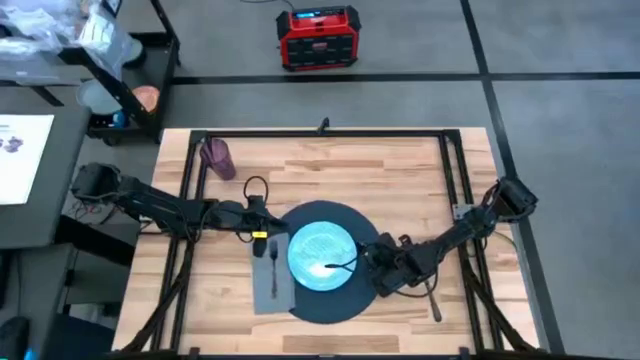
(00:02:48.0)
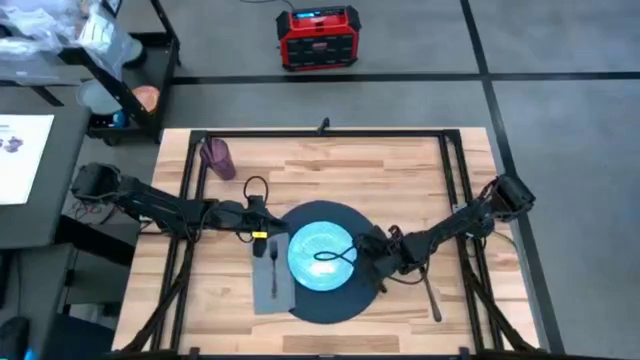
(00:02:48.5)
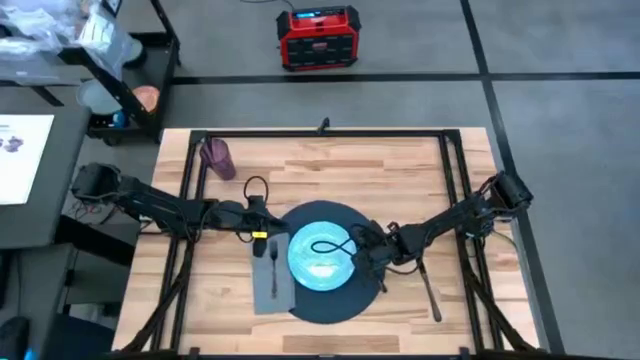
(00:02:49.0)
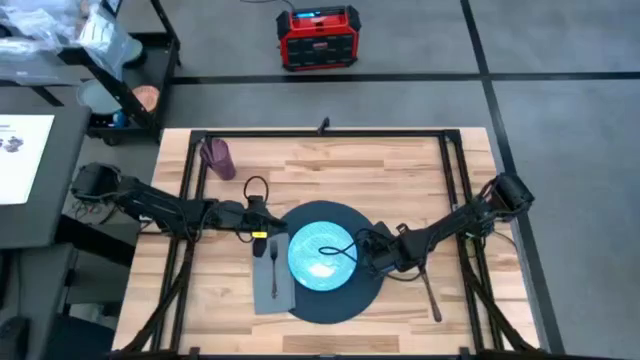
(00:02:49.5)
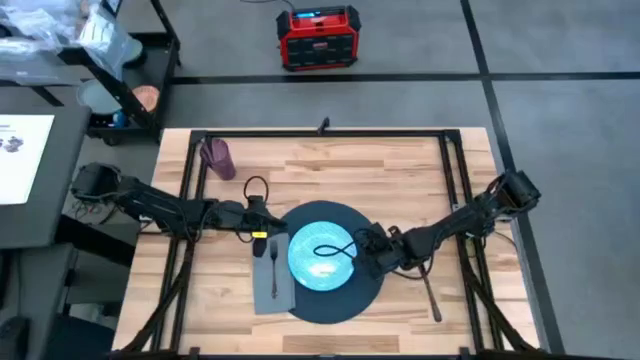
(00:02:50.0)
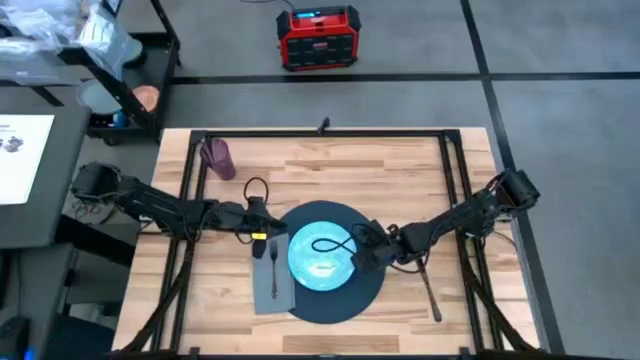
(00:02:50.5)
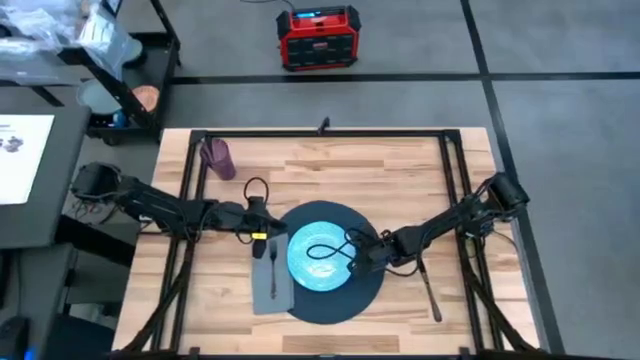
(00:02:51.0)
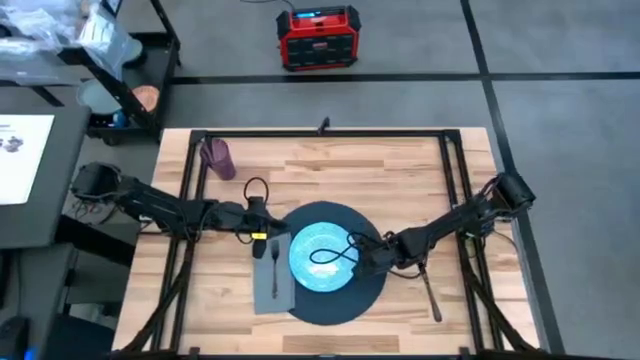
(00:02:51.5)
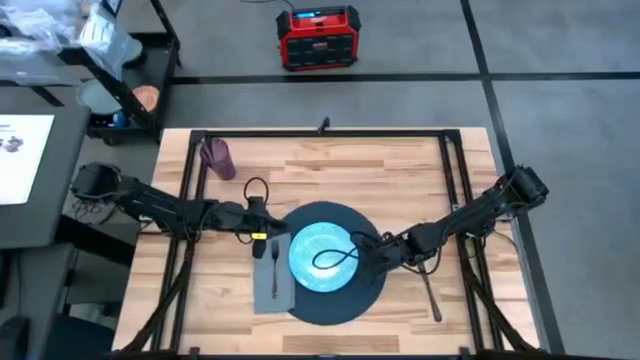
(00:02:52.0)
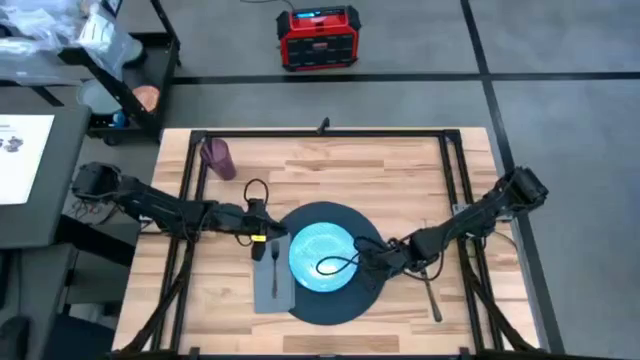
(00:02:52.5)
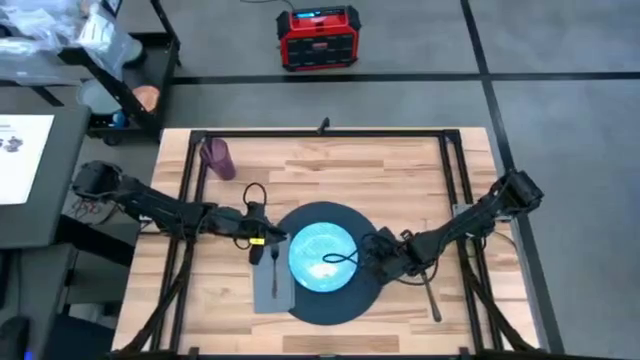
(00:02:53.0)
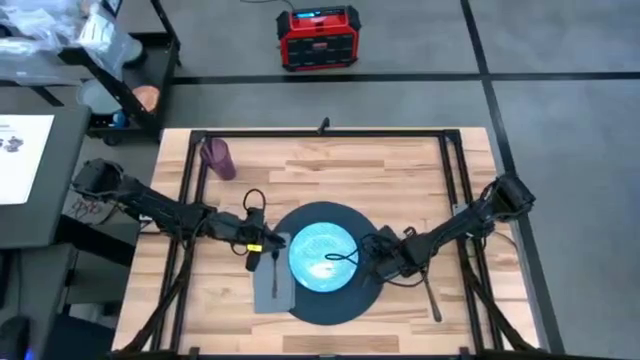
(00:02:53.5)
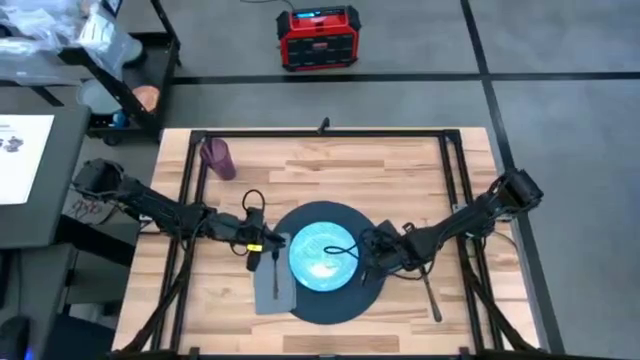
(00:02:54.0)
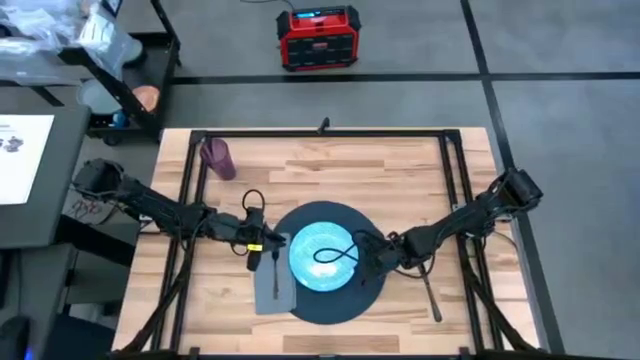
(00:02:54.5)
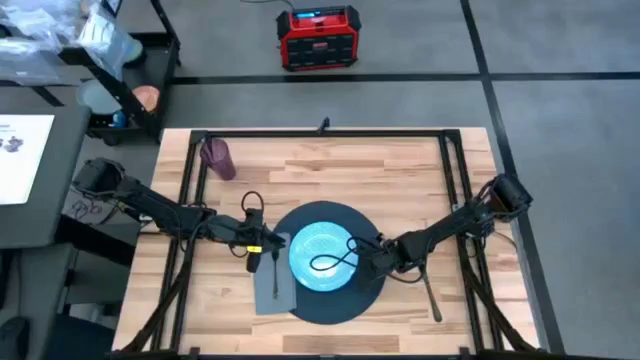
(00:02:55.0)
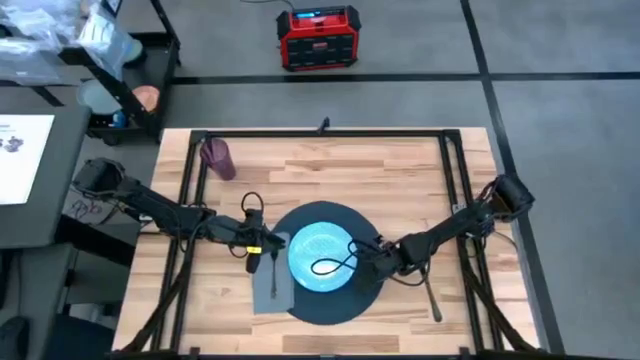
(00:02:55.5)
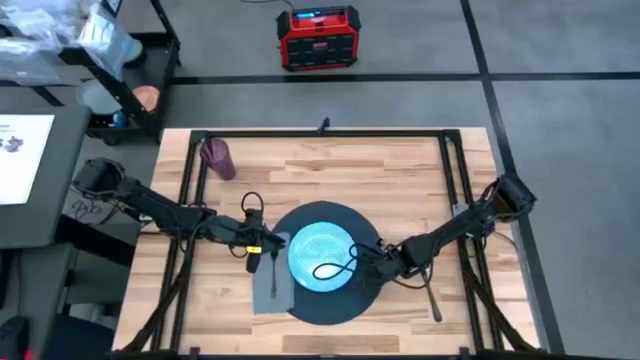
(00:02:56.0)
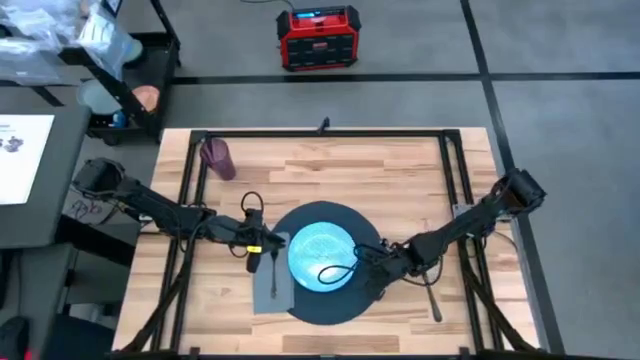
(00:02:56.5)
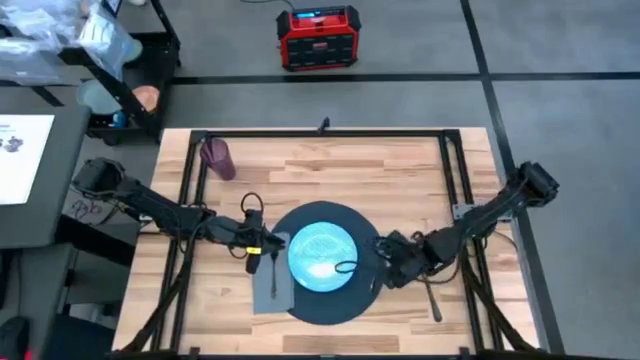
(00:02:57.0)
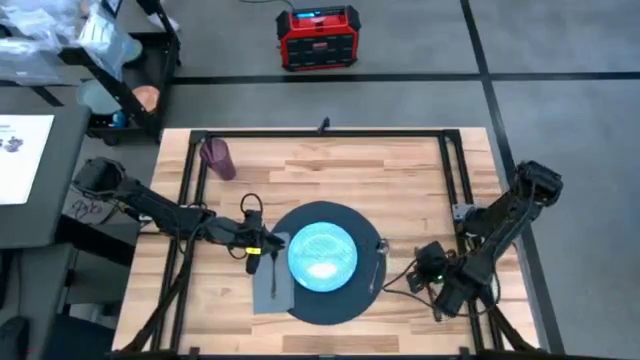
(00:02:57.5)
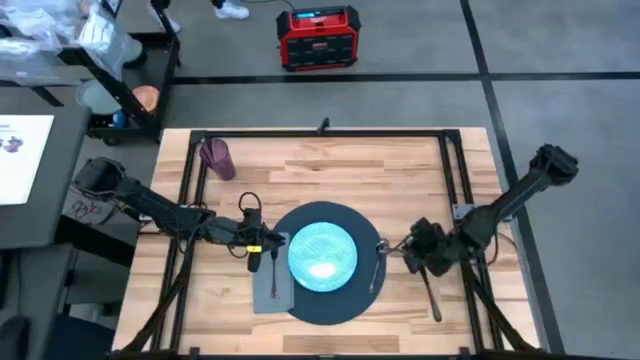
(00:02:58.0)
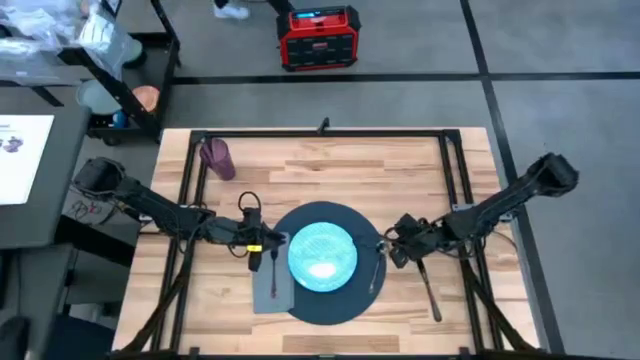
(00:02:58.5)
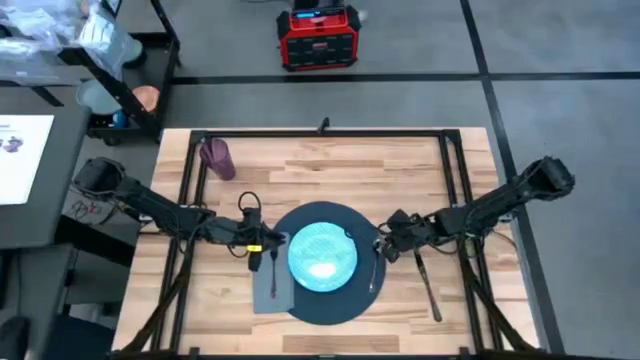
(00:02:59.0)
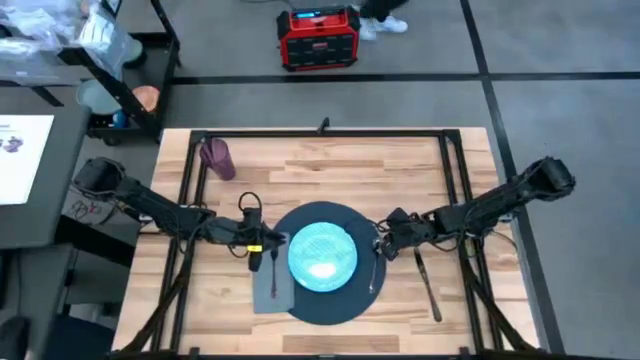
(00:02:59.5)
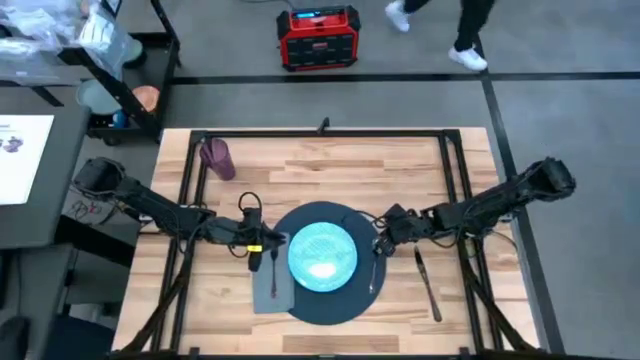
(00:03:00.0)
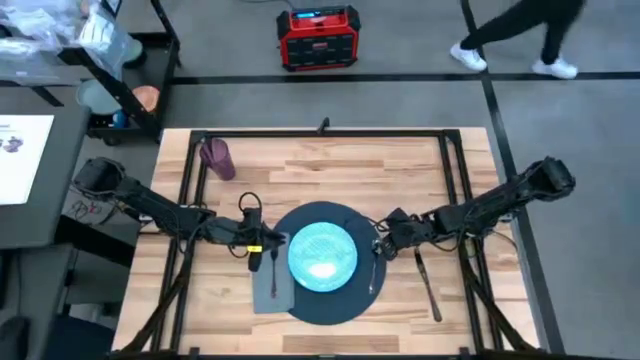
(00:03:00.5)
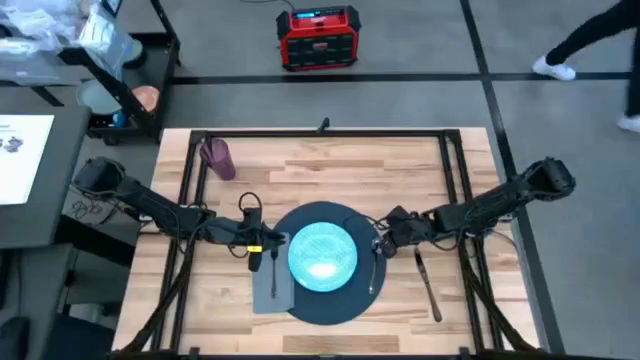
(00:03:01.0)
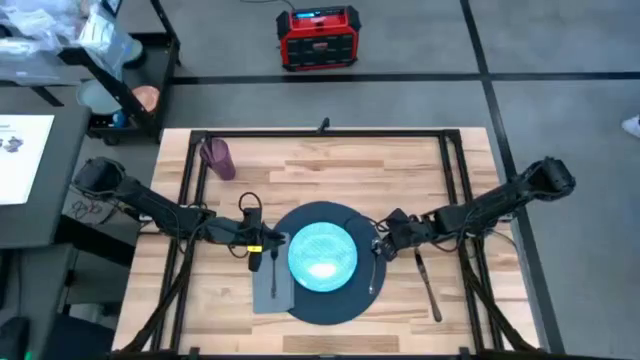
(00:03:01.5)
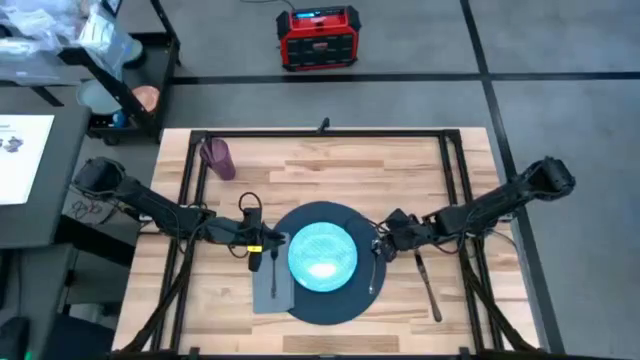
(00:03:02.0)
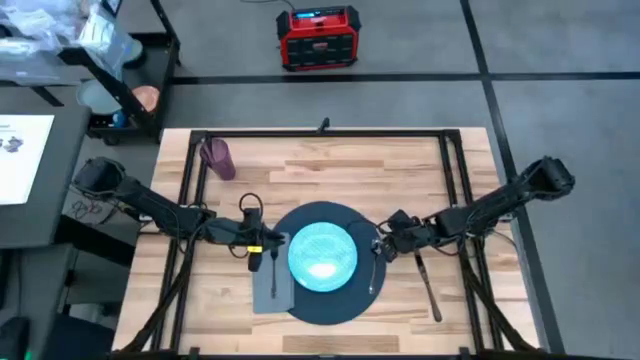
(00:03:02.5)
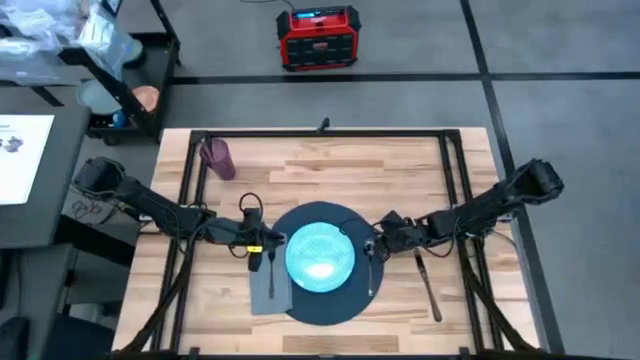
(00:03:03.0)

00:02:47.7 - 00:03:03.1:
Task: Set table place
Adjust the black spoon on the dark blue table mat

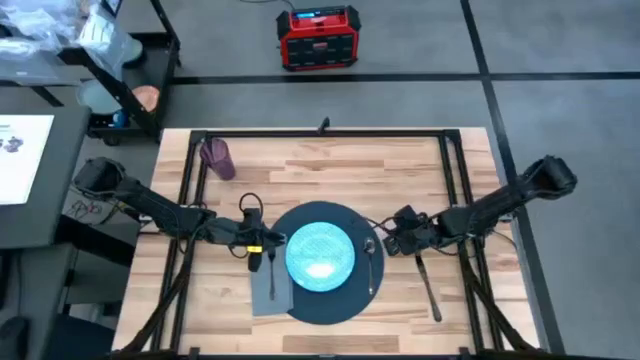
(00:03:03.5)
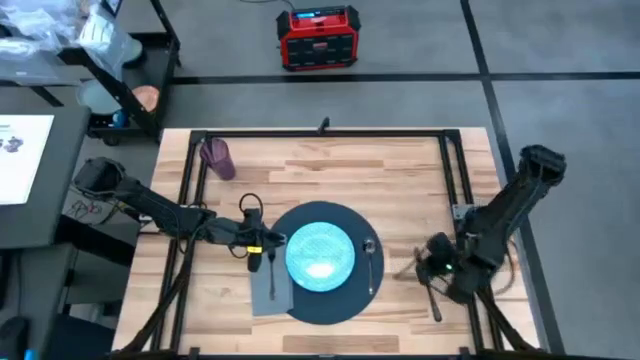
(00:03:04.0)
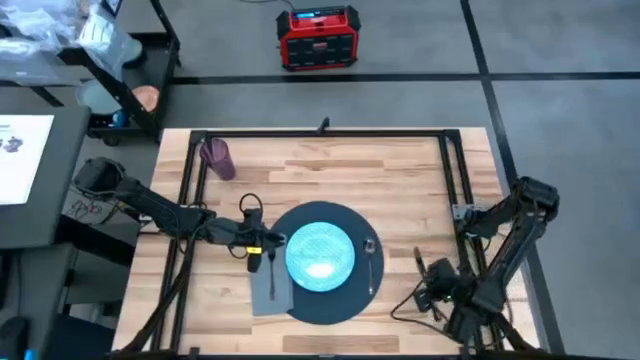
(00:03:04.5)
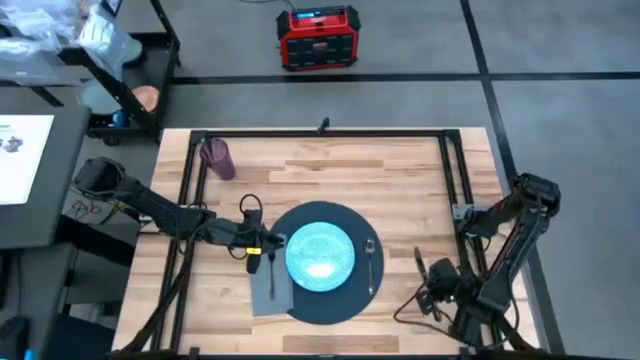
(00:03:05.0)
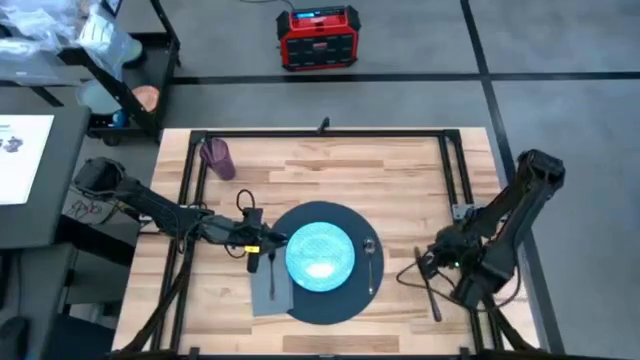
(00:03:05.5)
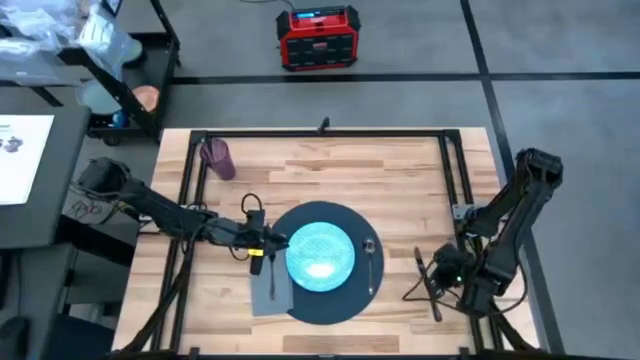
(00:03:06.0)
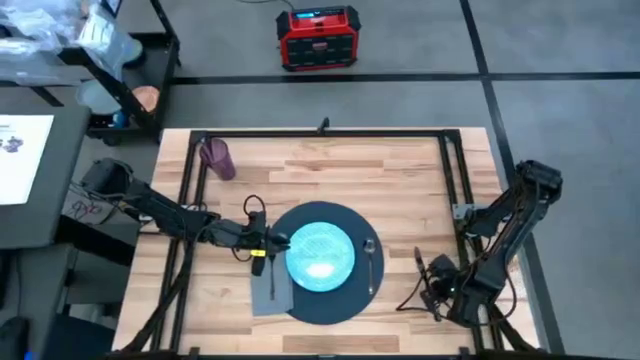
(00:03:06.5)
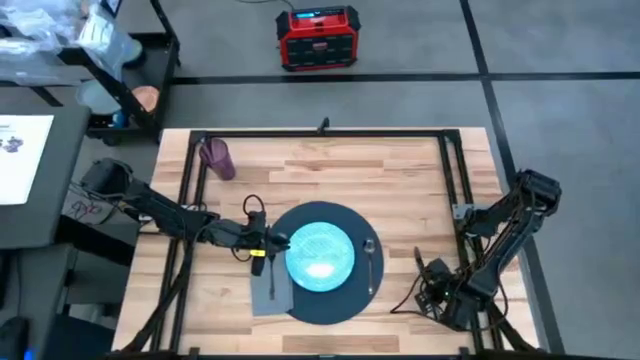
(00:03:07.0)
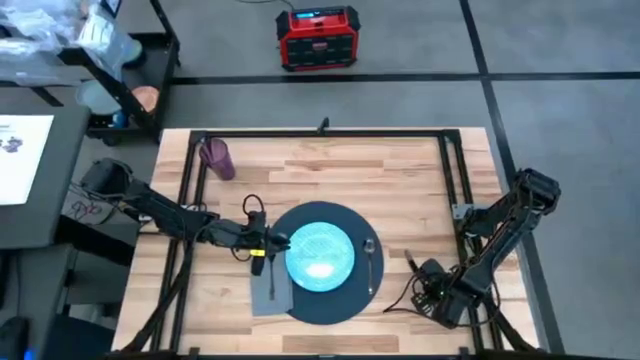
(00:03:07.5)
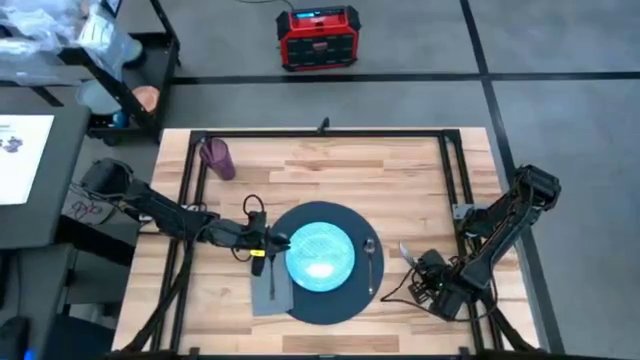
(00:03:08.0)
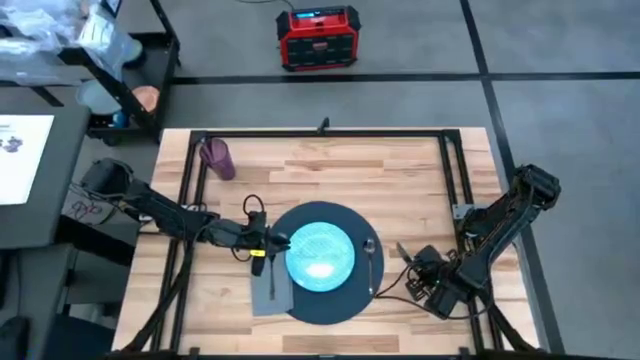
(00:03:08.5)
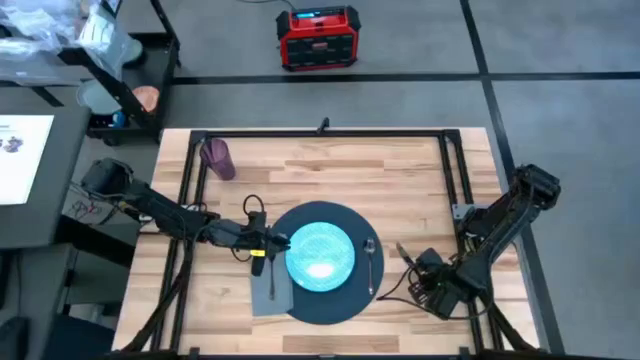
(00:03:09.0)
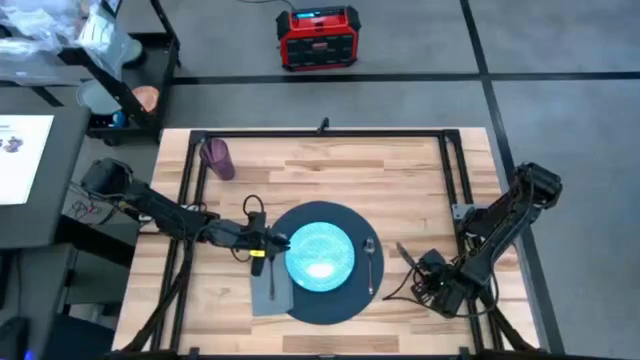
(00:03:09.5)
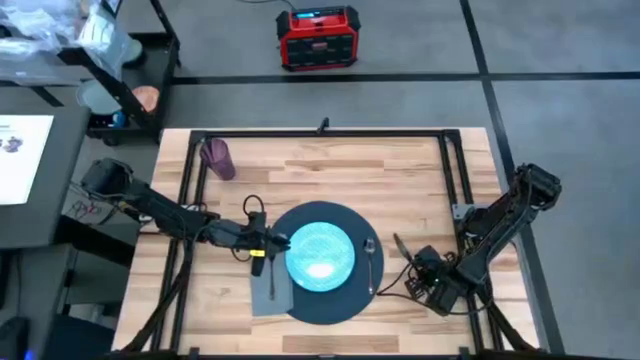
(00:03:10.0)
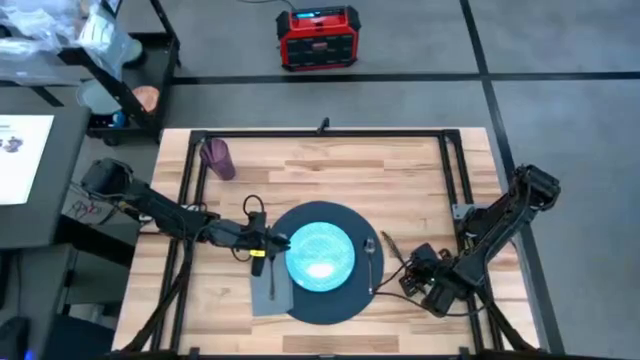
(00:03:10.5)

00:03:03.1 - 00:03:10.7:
Put the black knife on the dark blue table mat
